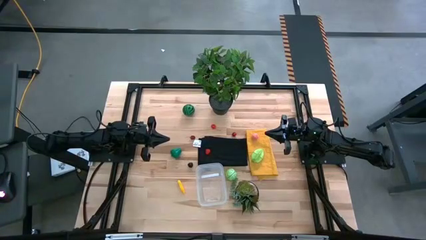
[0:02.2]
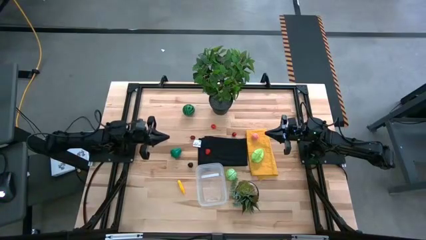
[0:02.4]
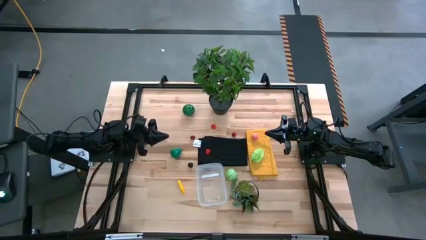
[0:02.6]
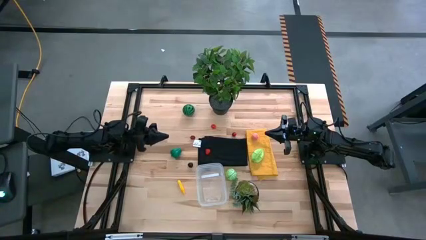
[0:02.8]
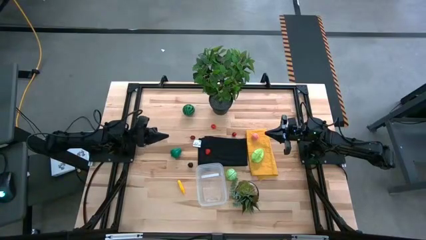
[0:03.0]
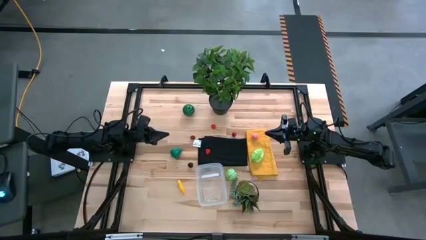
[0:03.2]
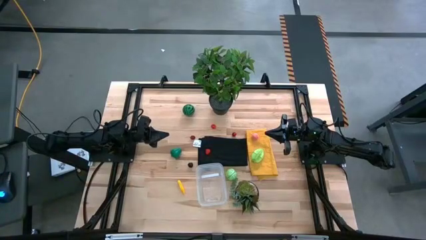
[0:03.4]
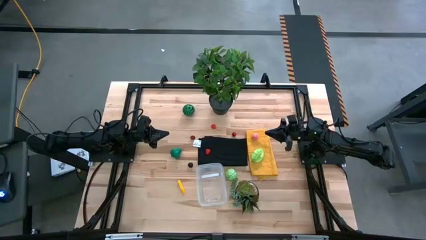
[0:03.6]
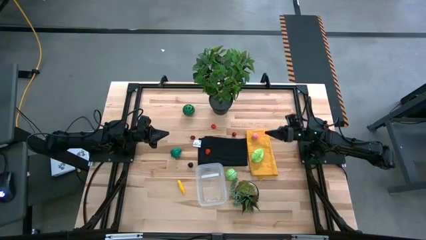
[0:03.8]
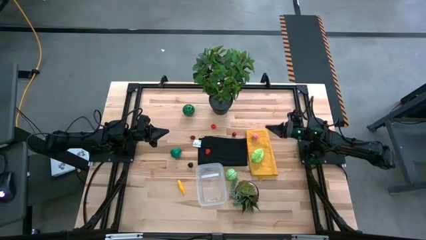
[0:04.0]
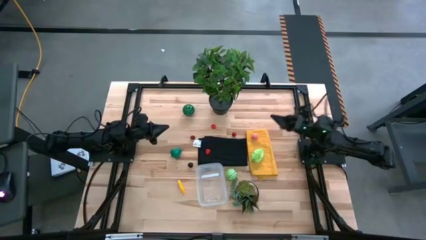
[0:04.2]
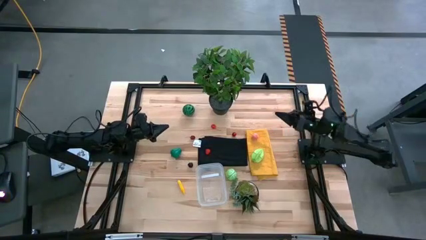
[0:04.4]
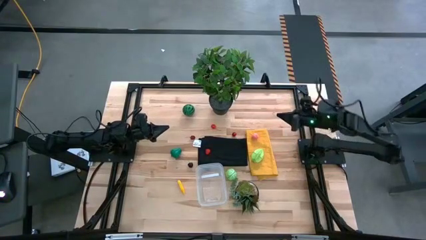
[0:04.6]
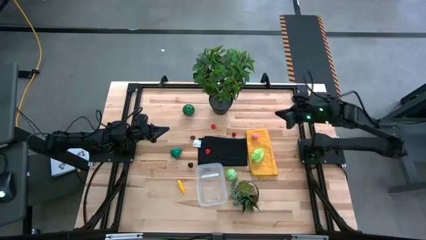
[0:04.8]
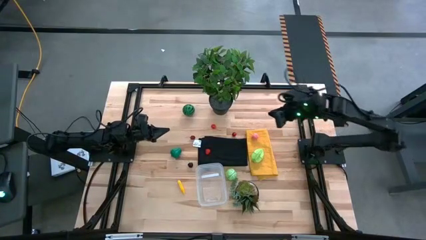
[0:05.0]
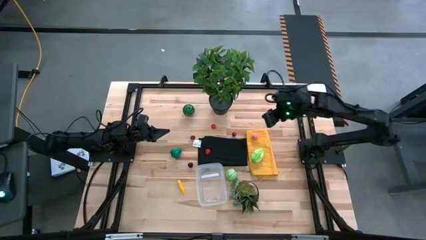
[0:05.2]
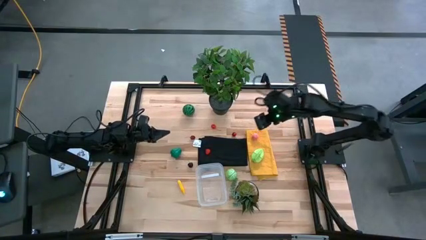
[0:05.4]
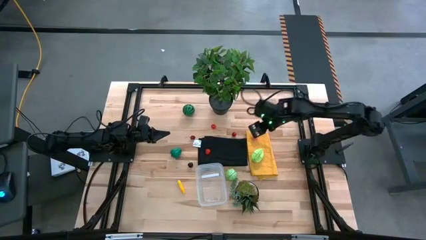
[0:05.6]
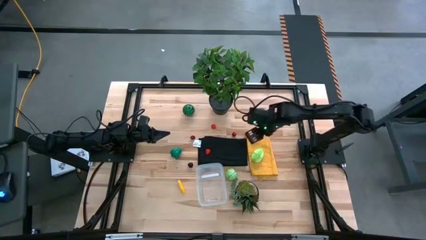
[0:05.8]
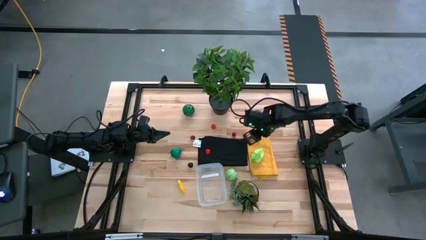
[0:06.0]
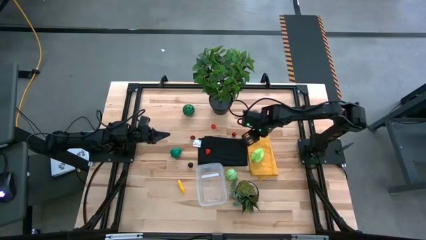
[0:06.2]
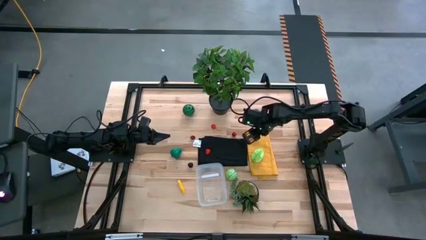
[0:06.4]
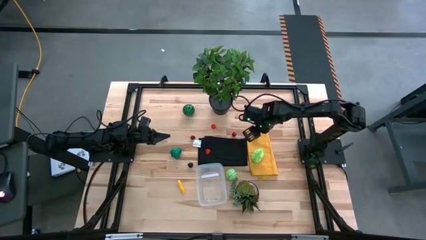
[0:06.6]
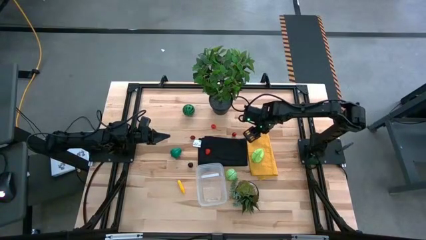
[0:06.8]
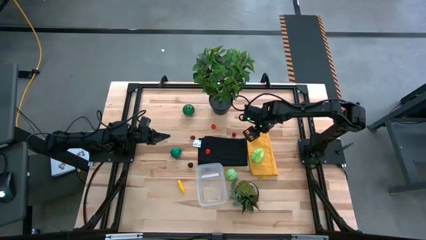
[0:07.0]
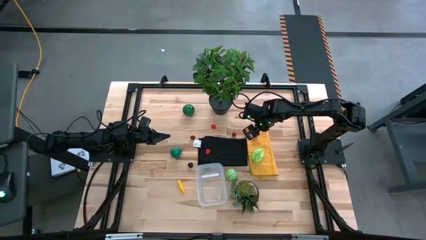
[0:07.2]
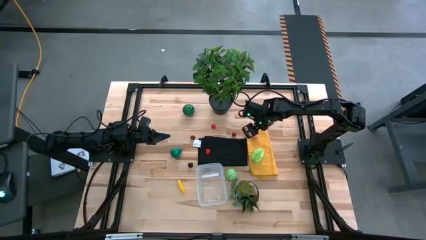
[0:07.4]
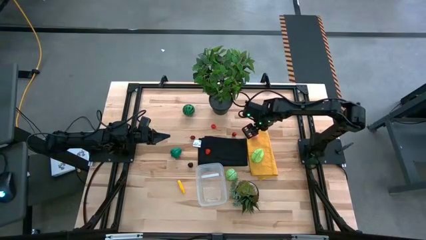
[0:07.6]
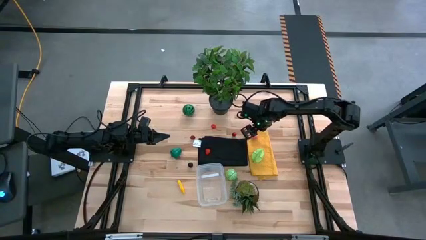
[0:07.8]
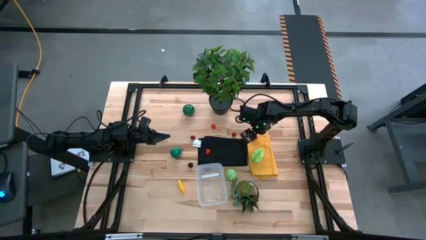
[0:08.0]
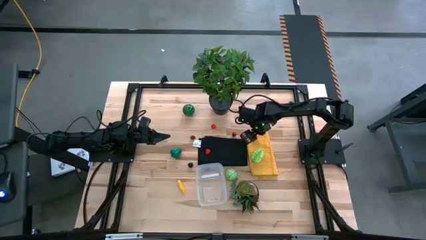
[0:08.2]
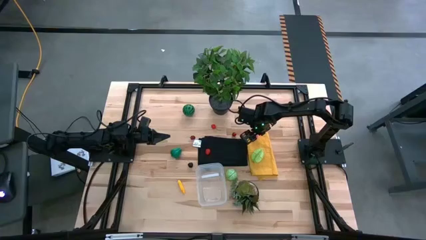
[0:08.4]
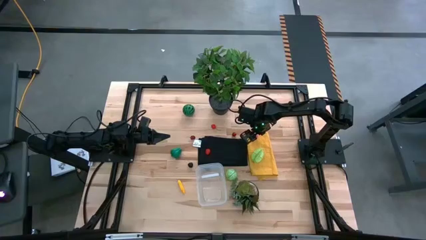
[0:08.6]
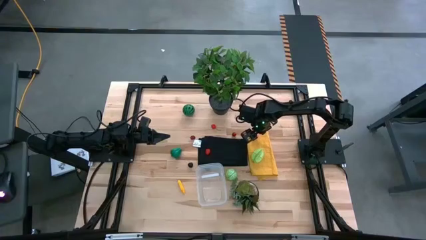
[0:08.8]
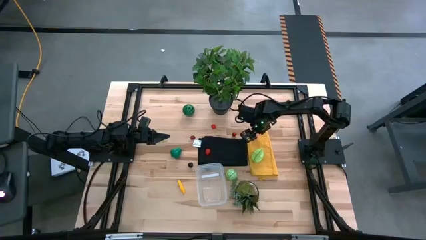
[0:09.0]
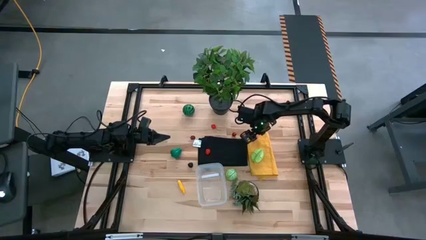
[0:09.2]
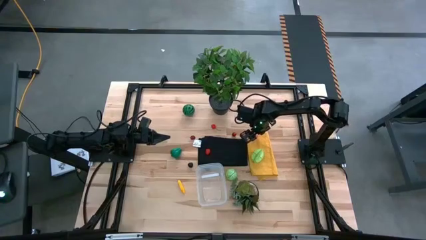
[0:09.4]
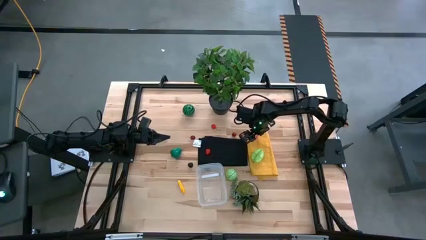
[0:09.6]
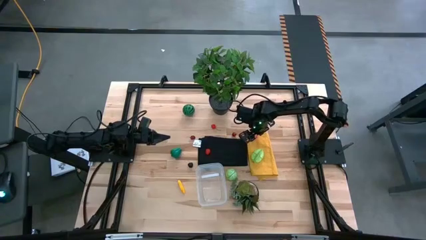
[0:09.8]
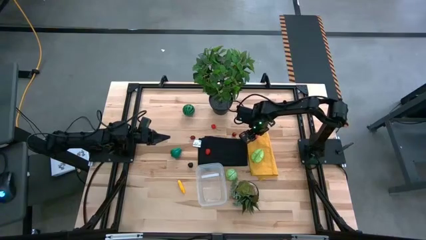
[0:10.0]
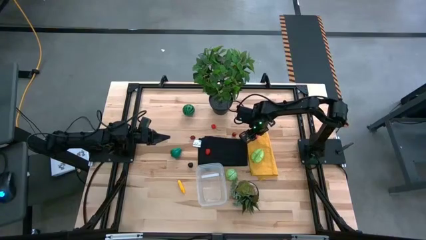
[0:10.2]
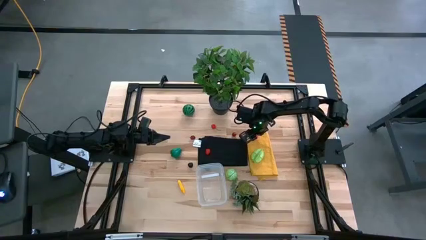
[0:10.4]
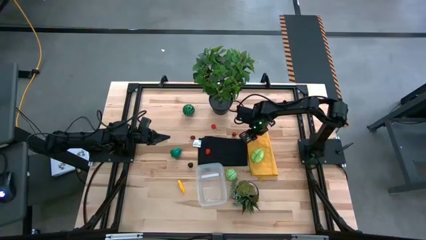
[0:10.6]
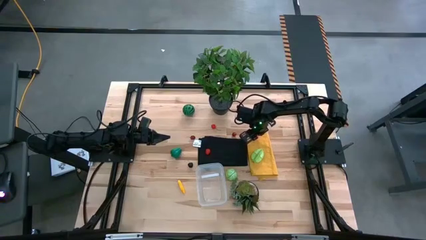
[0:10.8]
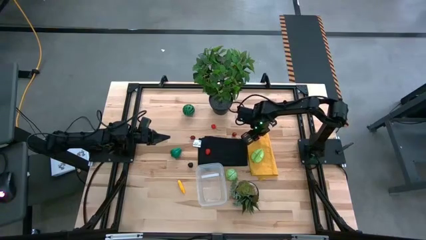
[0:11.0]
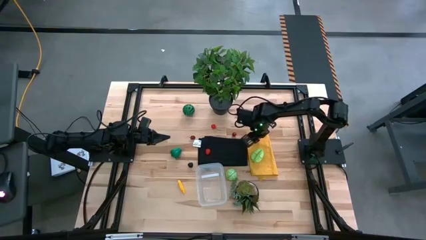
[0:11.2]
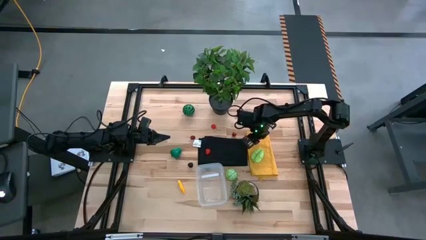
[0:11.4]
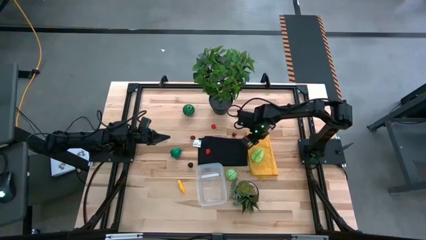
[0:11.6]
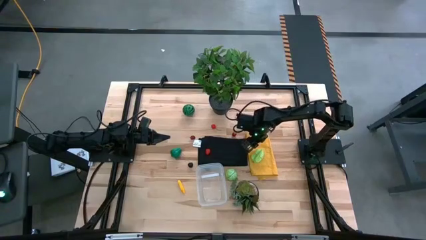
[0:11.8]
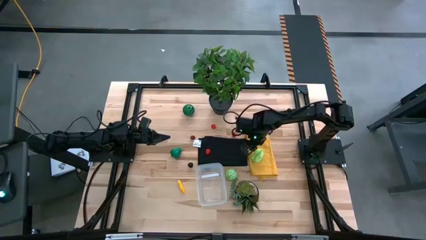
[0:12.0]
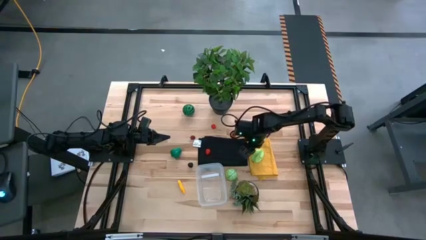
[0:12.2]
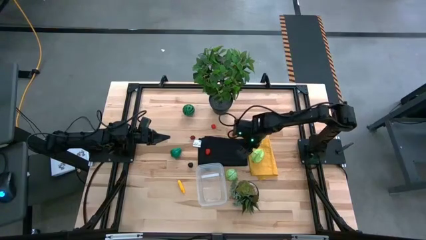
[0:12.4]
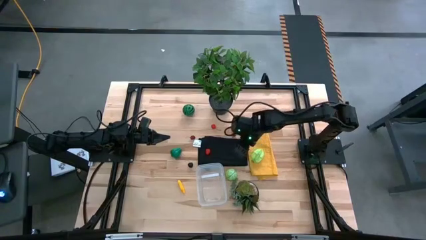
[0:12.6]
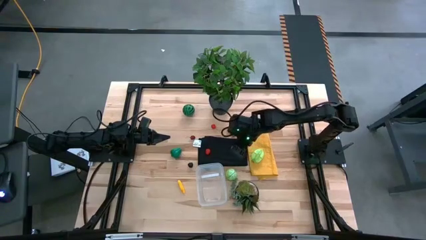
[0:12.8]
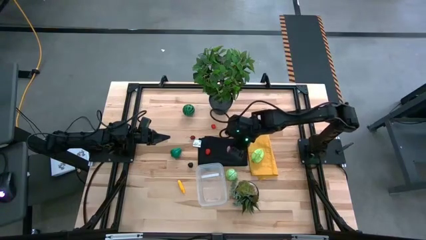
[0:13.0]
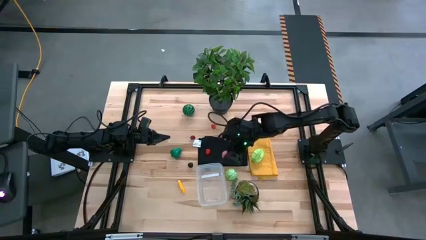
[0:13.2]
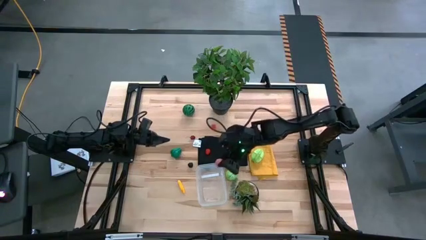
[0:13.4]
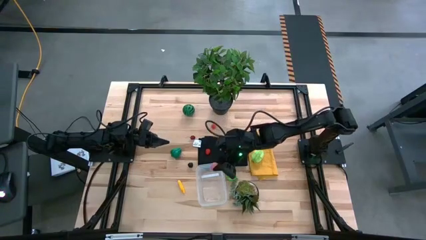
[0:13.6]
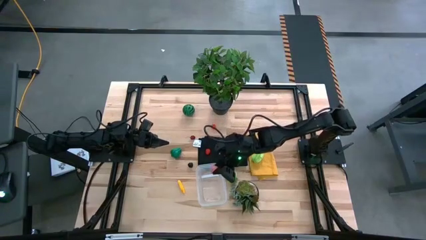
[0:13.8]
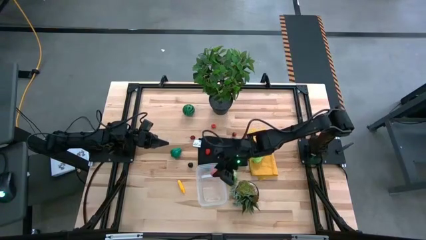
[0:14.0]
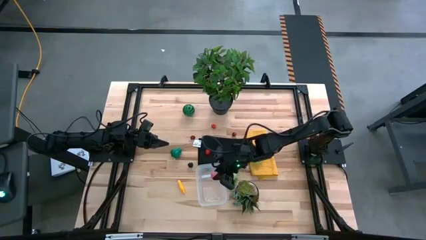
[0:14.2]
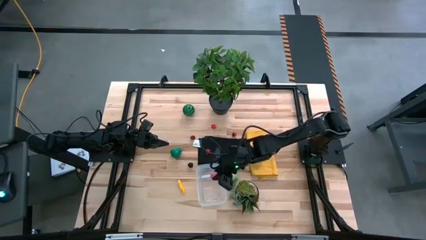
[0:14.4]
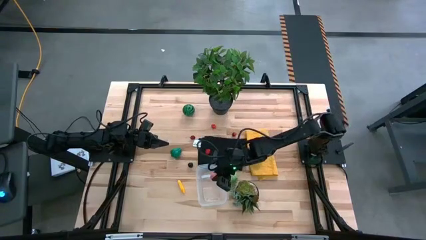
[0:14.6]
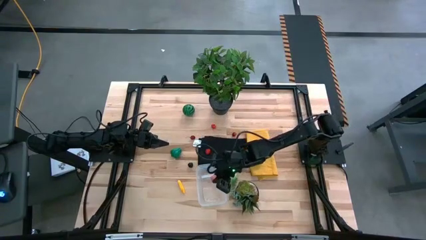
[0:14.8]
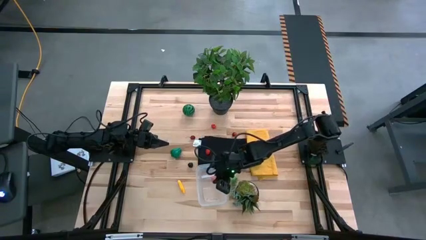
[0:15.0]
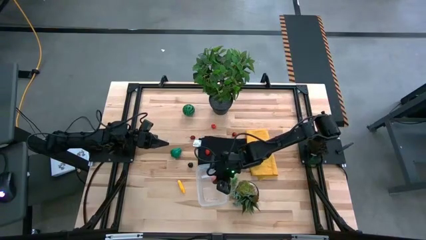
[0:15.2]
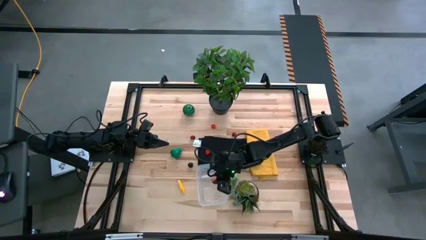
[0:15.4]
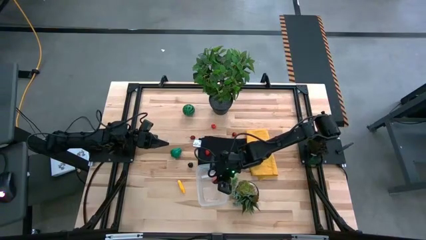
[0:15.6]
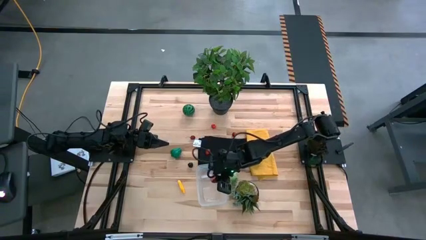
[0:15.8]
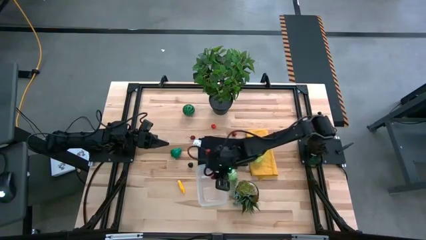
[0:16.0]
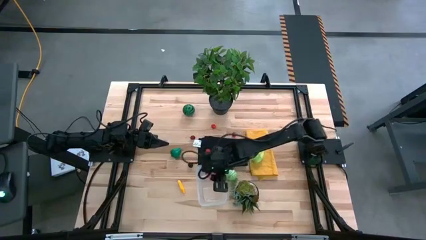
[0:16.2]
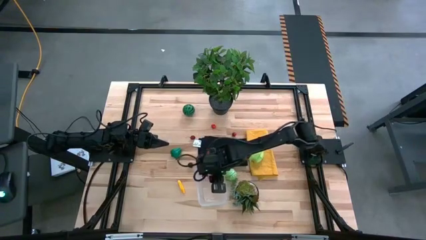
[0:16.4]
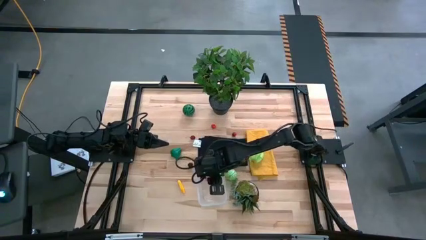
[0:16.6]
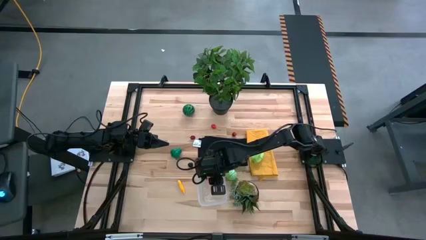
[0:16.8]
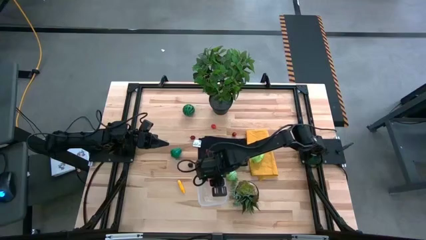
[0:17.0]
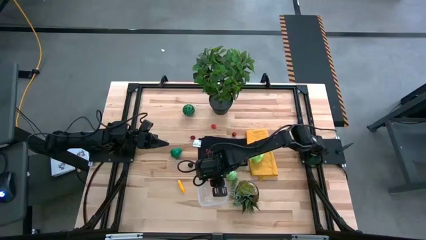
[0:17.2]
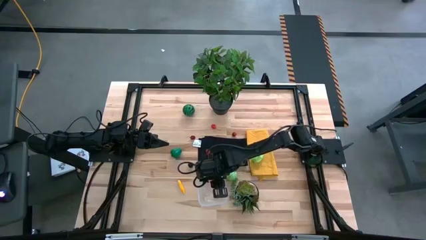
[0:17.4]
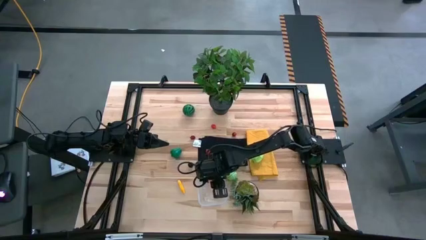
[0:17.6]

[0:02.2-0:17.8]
Task: Pick and placing Produce into tupperware
Put the peach into the bin
